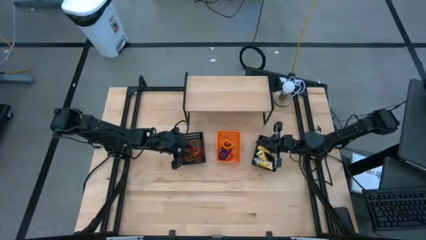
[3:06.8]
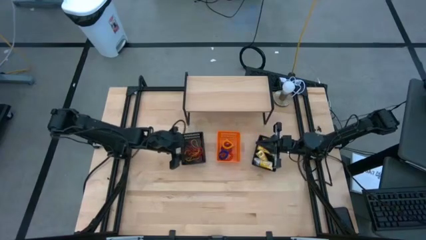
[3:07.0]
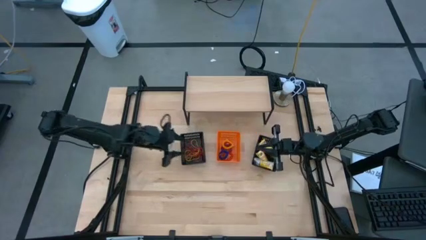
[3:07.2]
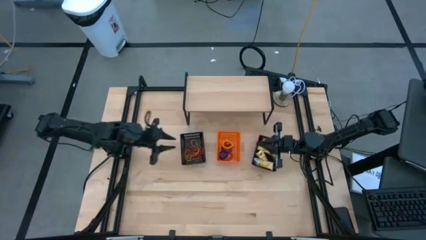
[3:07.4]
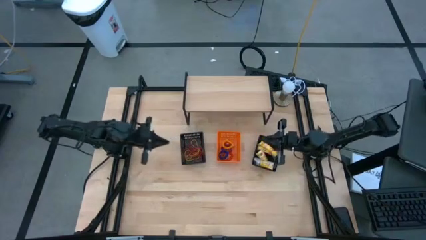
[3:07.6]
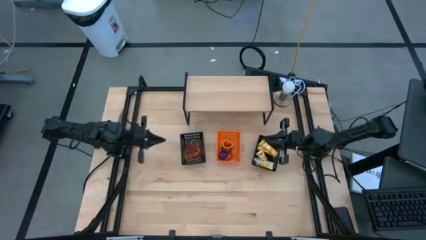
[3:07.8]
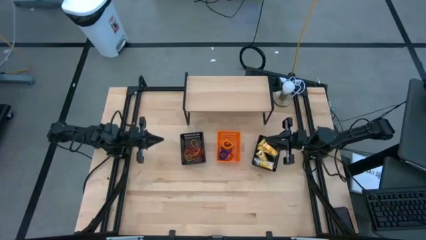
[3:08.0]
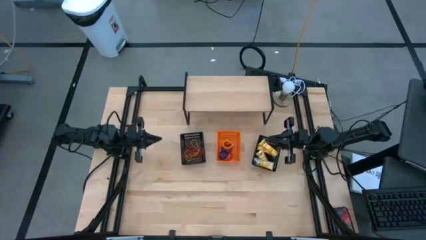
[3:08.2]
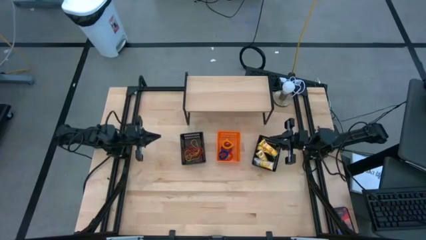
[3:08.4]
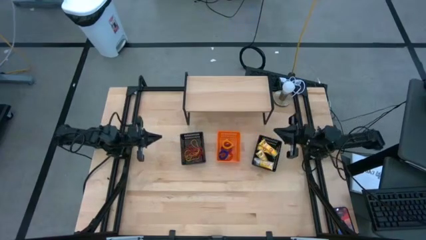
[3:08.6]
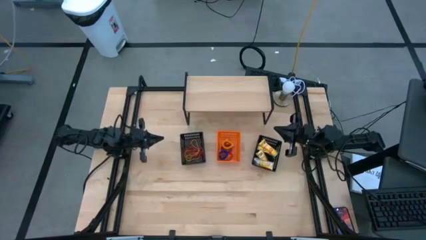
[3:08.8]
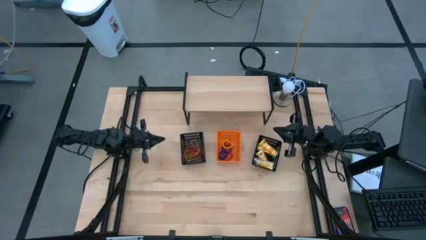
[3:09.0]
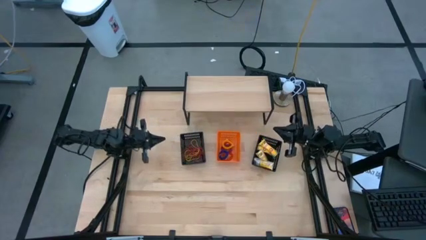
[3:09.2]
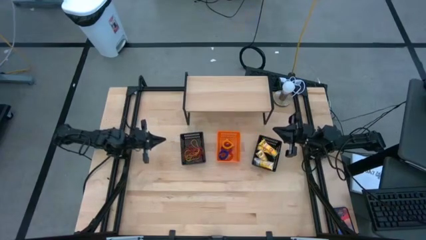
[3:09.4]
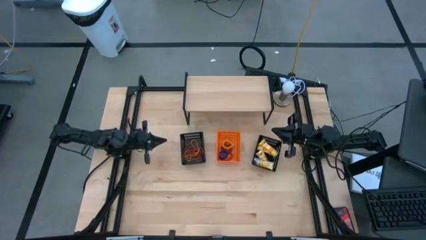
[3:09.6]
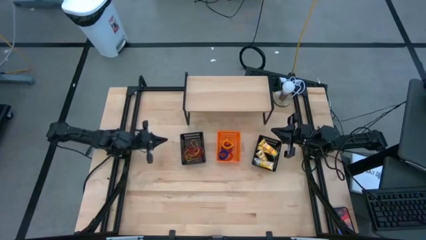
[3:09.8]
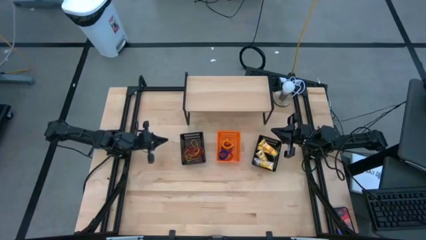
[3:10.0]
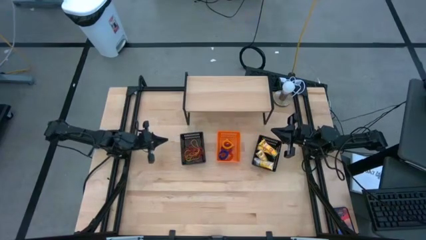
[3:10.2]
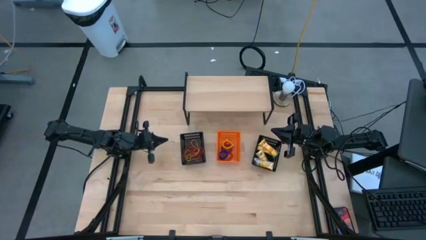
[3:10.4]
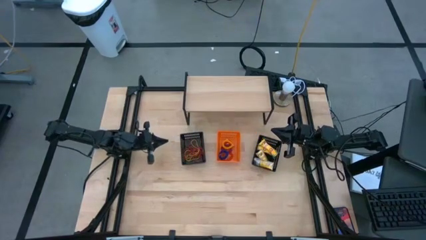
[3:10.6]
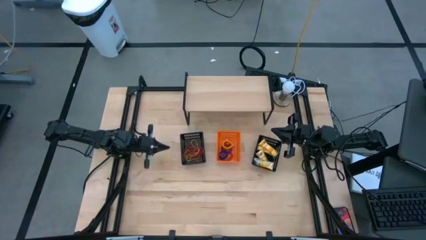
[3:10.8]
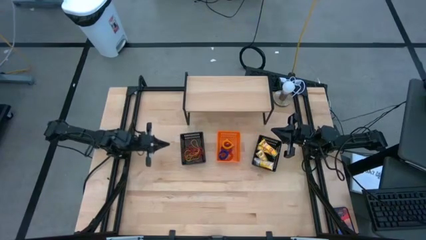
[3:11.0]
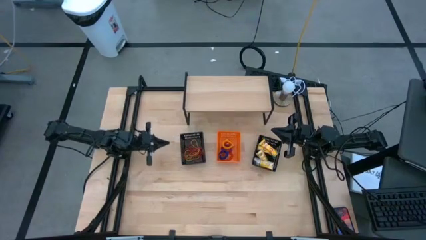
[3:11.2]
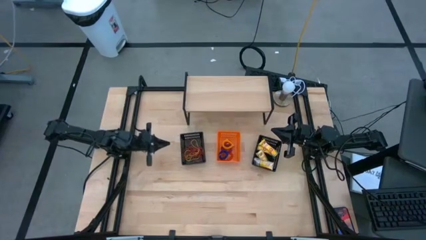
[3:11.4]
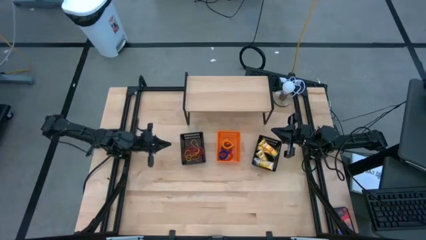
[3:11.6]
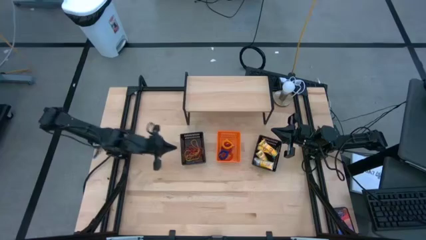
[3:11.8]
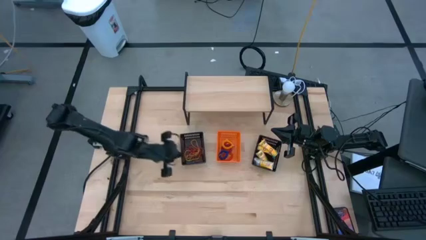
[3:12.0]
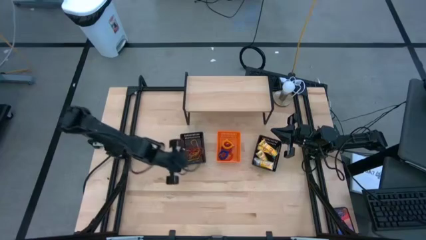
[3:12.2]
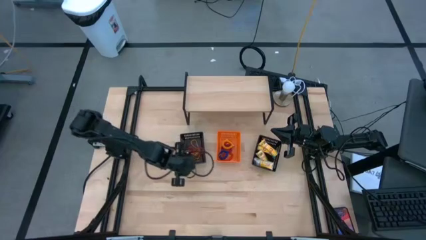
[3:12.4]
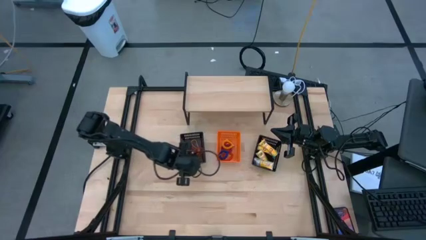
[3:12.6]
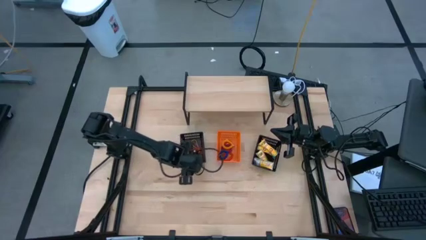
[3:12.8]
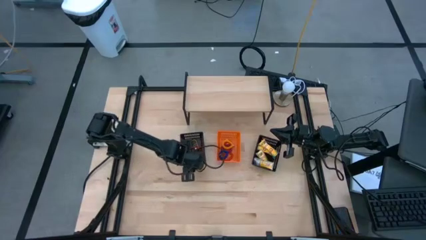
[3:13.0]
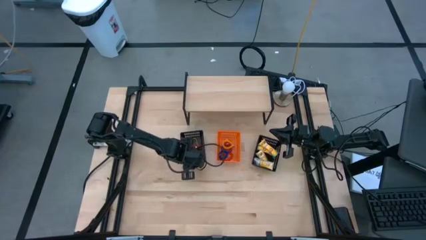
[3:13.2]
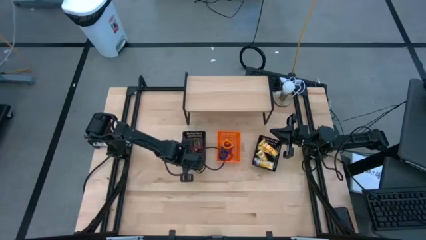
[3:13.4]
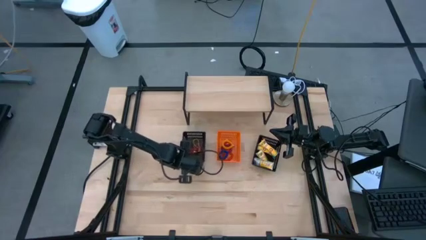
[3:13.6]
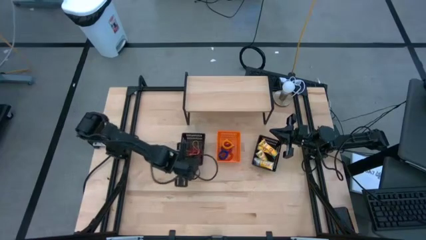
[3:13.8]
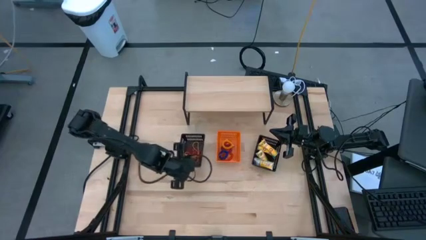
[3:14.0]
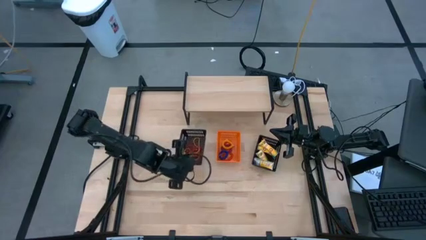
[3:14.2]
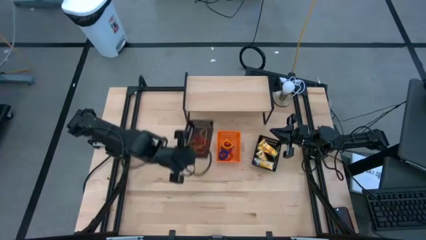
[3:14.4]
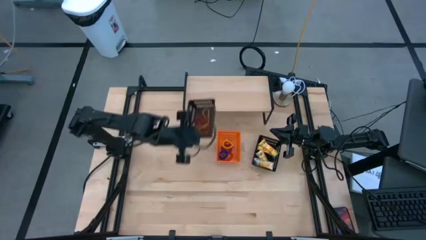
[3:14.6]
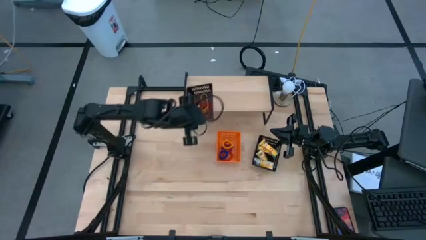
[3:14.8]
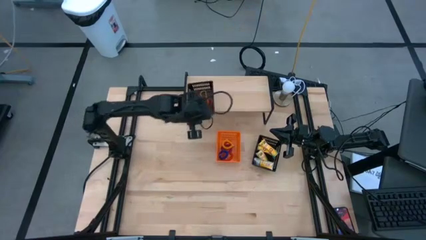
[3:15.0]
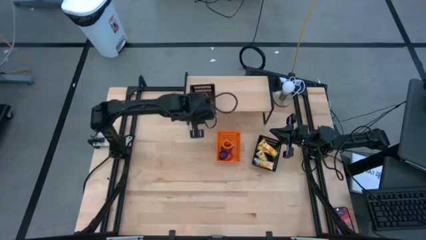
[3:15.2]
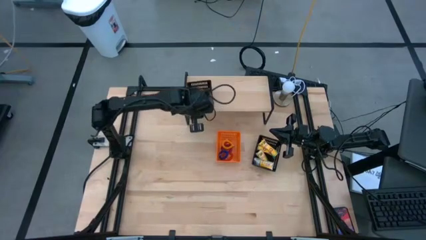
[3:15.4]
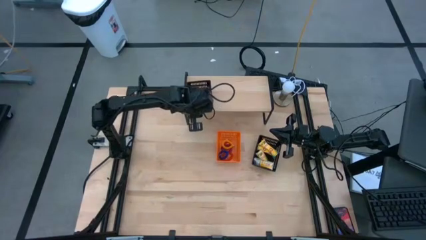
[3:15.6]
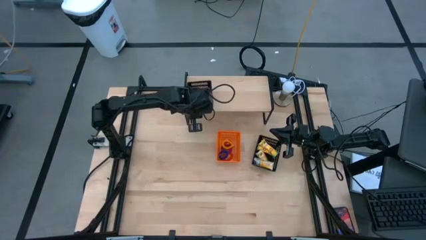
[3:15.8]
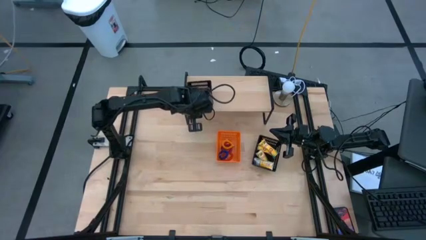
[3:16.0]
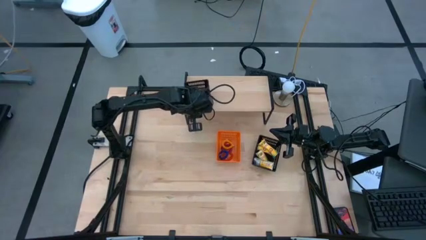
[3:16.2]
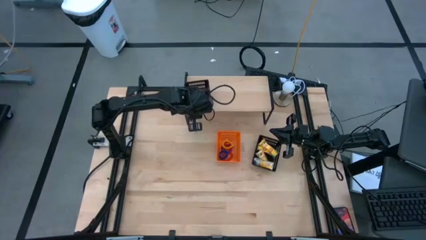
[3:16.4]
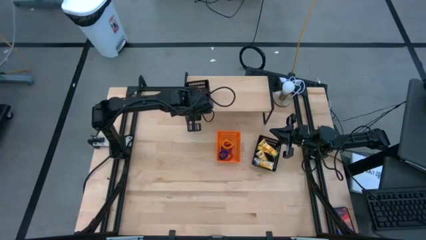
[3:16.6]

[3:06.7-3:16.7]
Task: Pick & Place Office Desk Supplies
Put the left black bin on the shelf

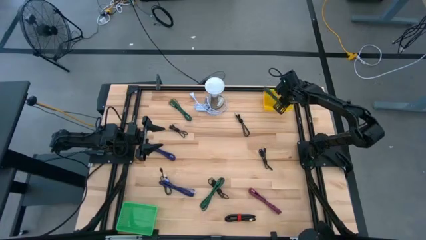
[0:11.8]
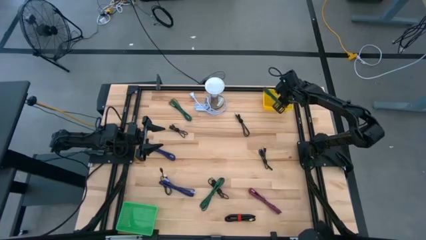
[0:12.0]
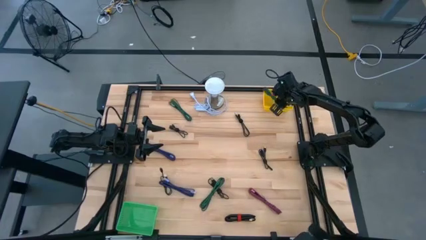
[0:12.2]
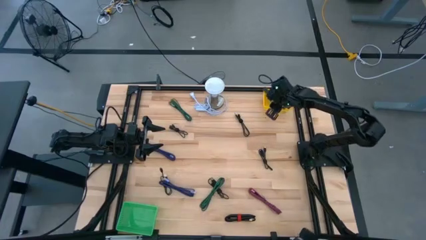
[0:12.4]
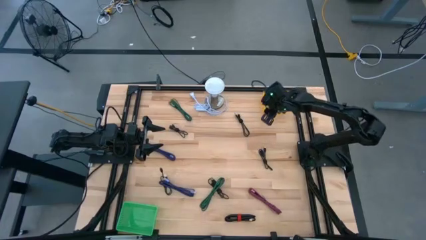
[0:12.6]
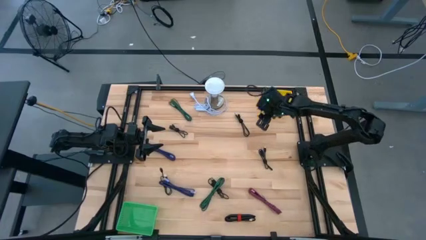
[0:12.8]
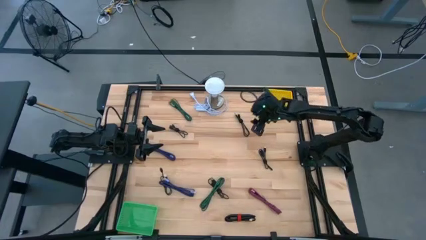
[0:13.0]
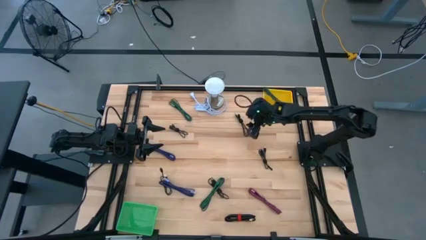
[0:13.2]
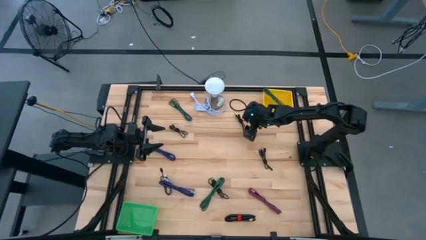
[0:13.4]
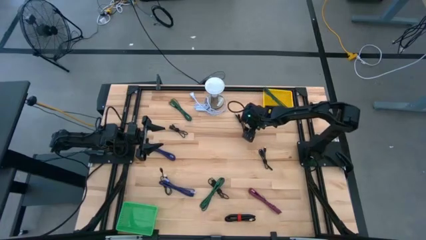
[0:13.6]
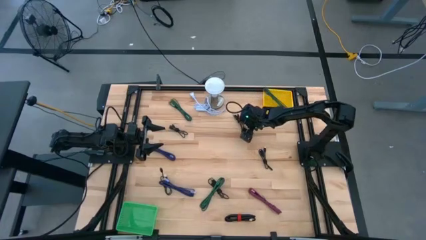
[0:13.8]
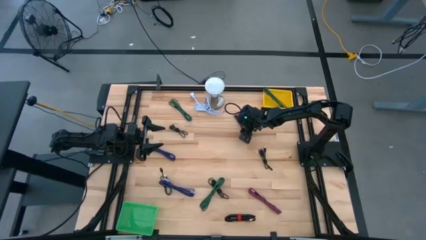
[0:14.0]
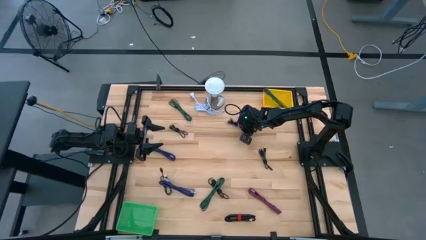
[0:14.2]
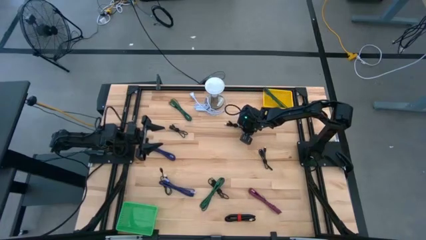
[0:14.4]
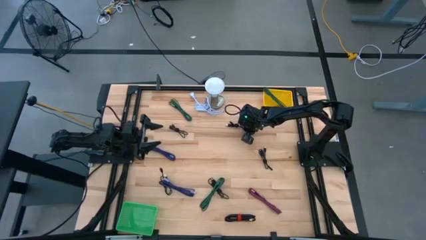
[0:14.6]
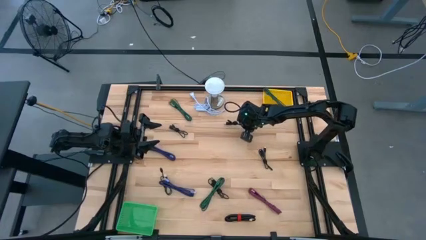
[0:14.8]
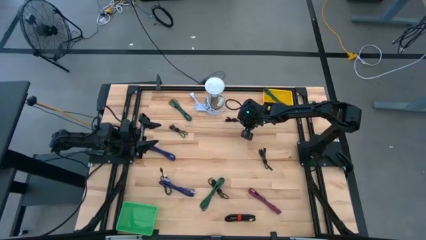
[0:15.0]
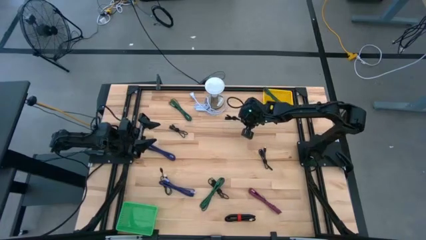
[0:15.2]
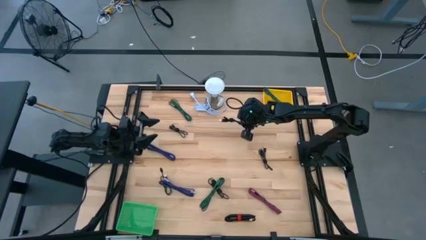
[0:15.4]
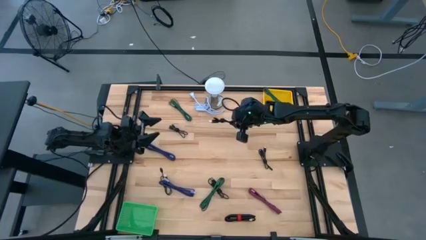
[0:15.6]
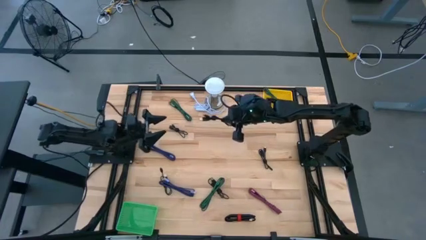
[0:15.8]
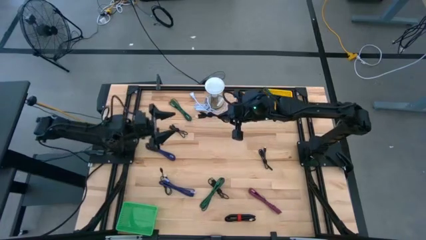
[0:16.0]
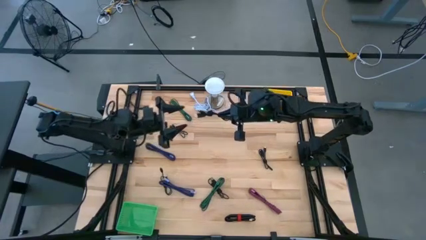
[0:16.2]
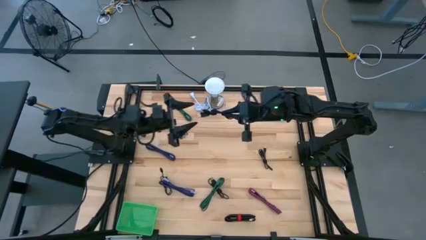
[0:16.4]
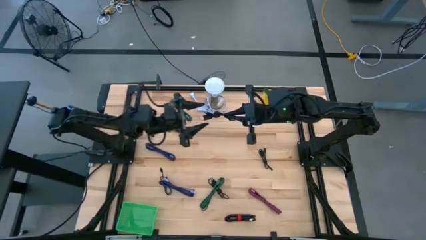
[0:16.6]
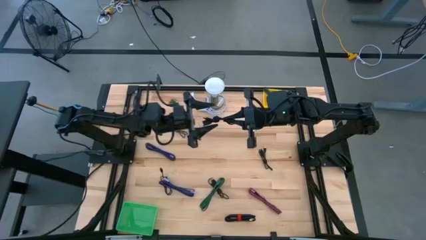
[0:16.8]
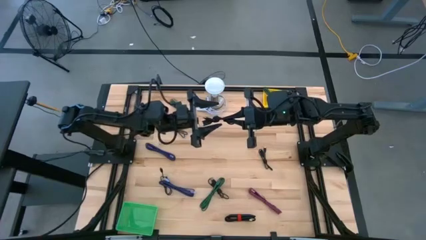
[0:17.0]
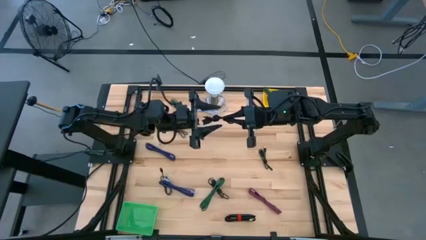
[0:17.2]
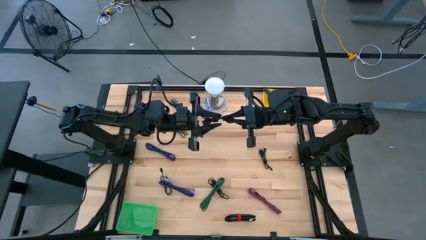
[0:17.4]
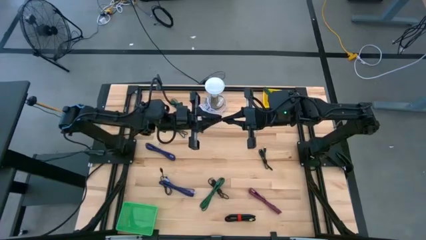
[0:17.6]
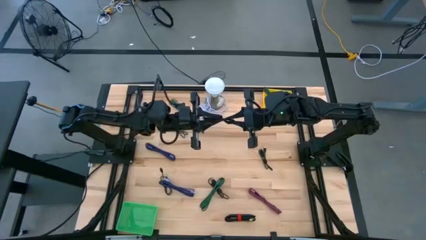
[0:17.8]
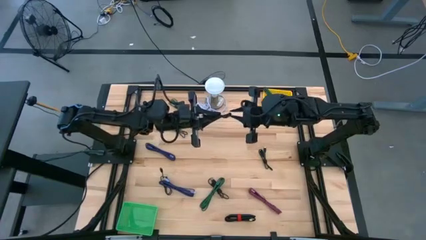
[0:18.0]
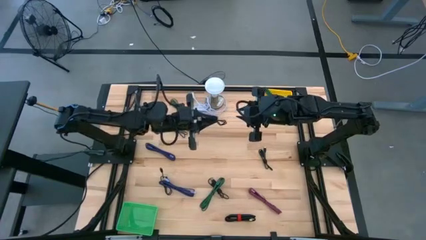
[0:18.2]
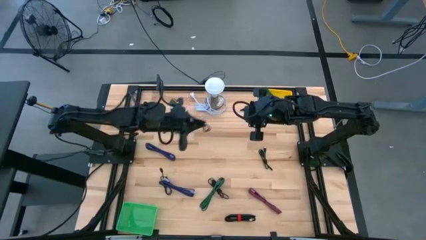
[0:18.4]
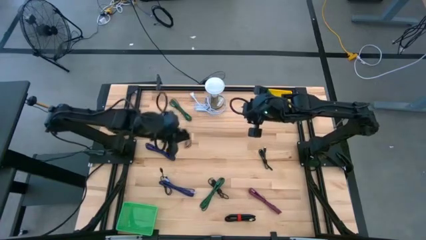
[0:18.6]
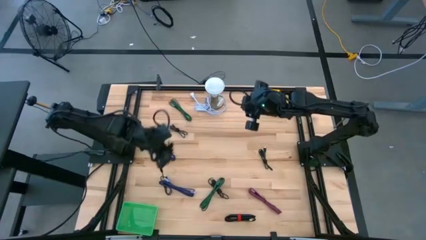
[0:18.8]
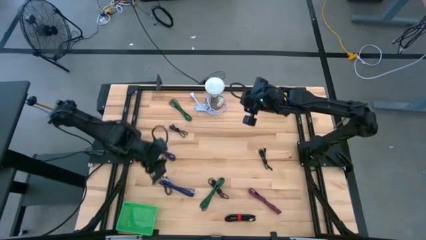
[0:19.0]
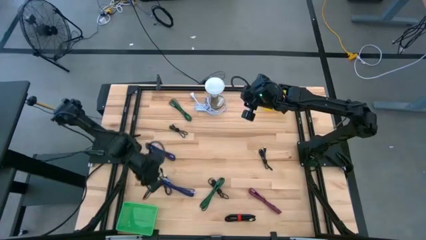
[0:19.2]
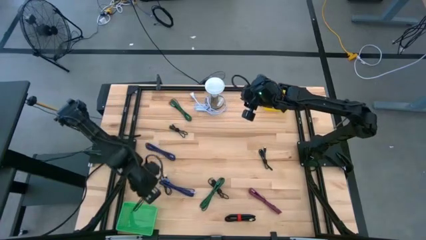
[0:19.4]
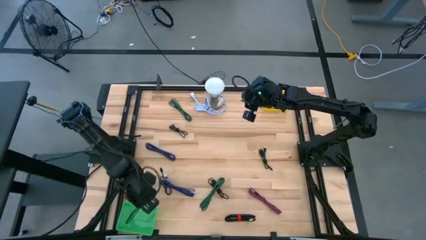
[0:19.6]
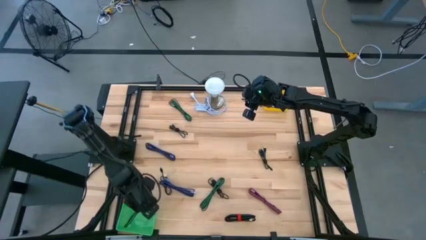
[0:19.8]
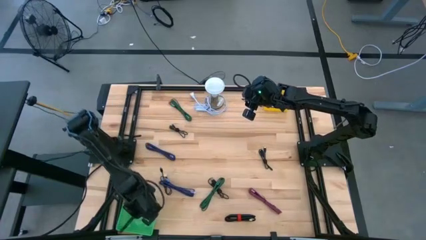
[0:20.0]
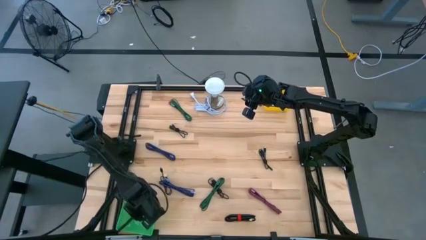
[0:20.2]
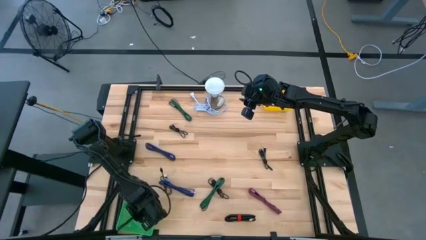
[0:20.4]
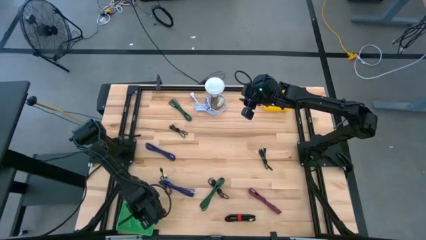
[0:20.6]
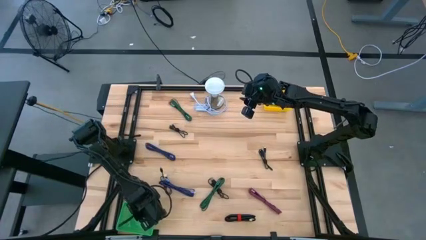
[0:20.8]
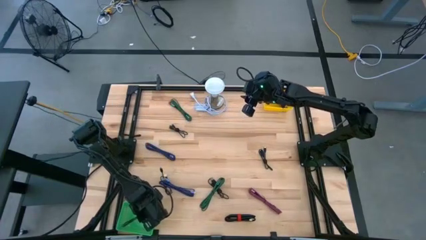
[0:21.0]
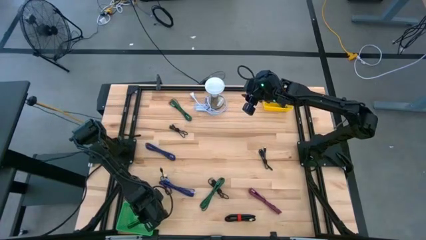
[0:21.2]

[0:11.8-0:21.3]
Task: Pick & Place USB Port
Put the black USB cable into the green bin
